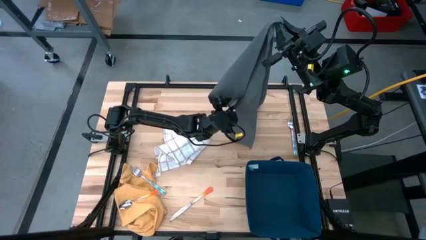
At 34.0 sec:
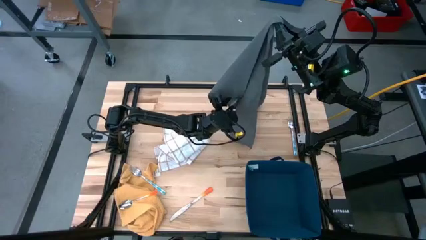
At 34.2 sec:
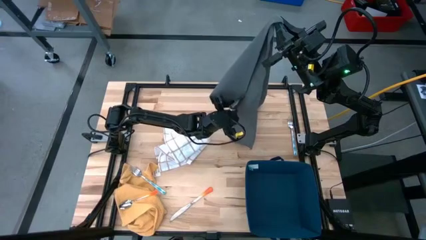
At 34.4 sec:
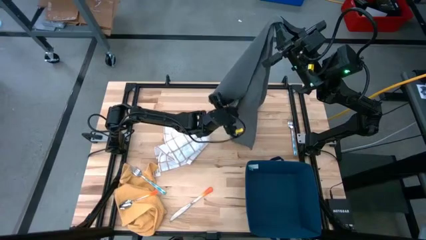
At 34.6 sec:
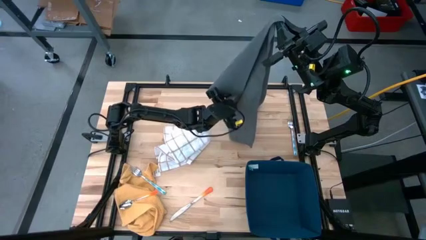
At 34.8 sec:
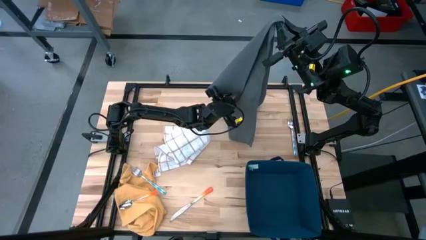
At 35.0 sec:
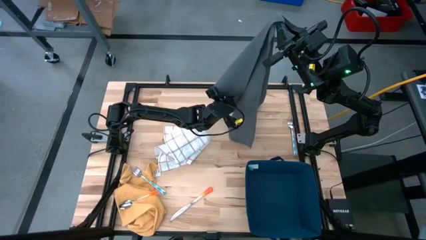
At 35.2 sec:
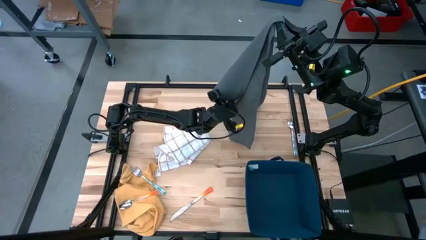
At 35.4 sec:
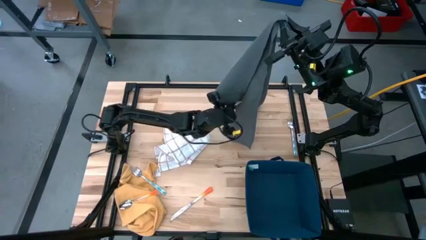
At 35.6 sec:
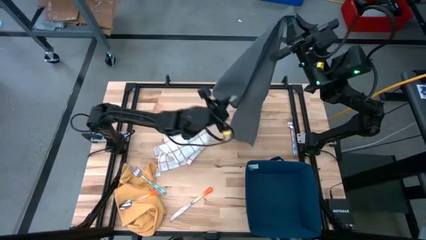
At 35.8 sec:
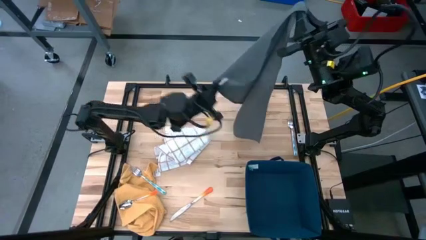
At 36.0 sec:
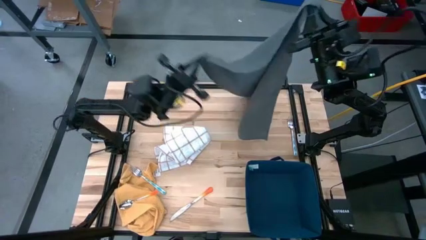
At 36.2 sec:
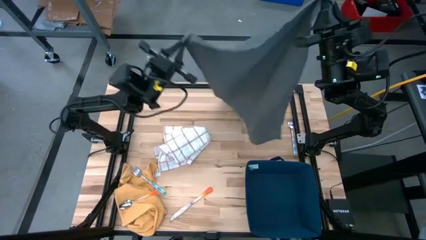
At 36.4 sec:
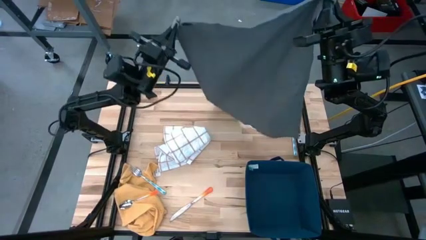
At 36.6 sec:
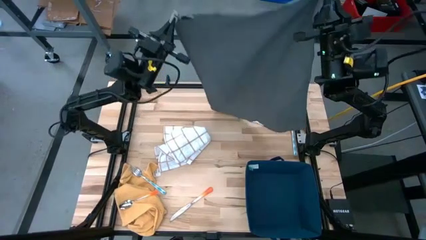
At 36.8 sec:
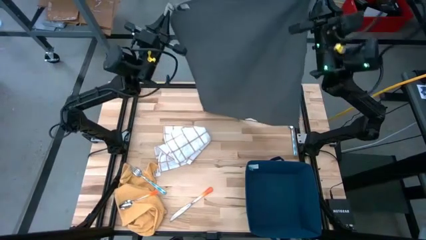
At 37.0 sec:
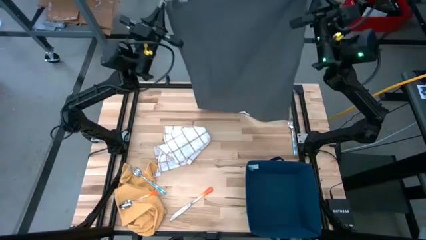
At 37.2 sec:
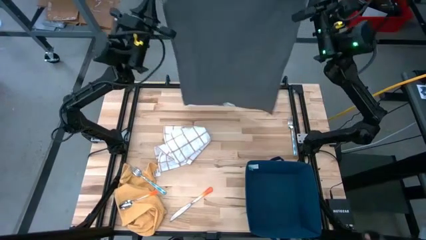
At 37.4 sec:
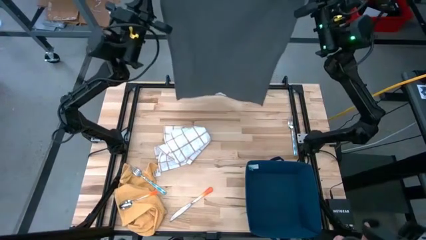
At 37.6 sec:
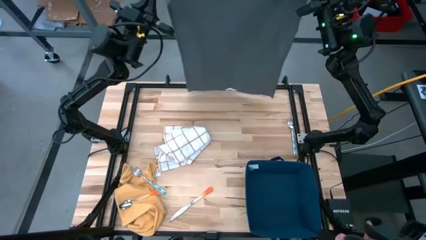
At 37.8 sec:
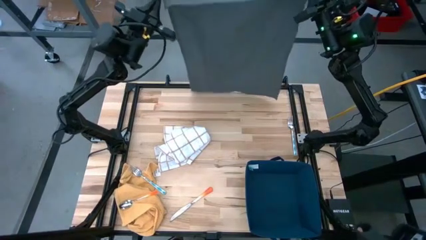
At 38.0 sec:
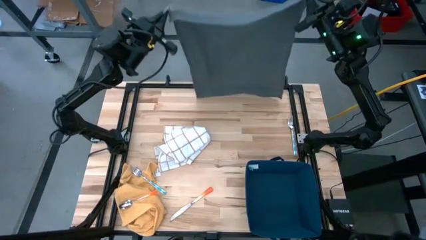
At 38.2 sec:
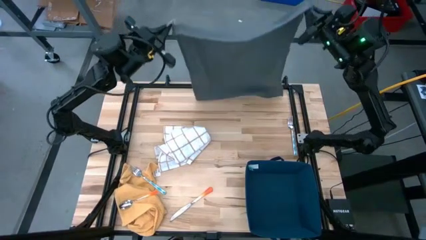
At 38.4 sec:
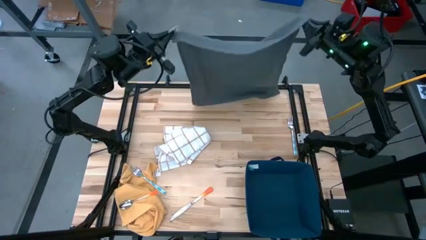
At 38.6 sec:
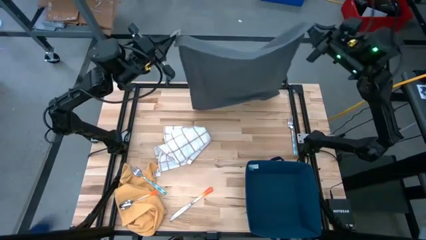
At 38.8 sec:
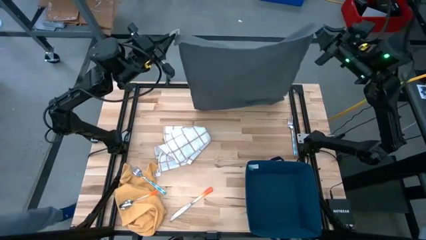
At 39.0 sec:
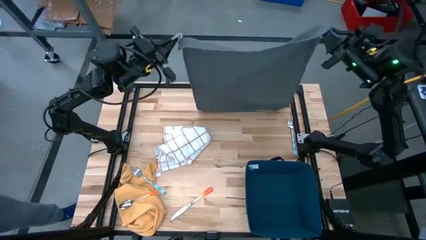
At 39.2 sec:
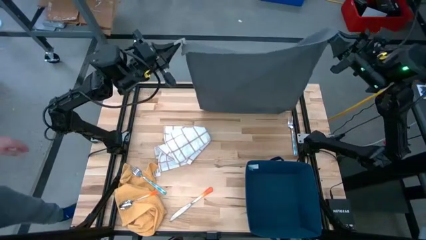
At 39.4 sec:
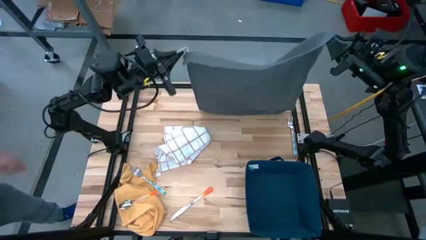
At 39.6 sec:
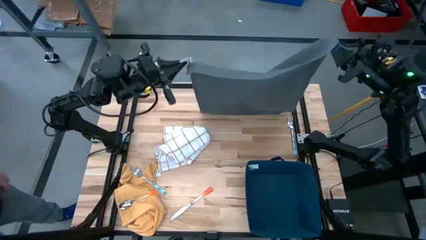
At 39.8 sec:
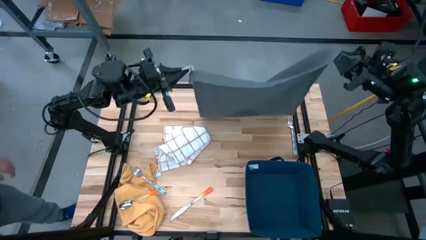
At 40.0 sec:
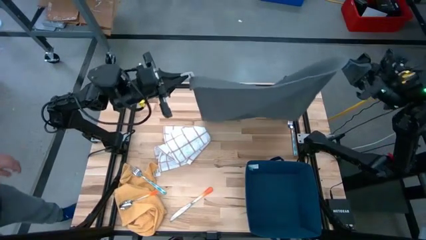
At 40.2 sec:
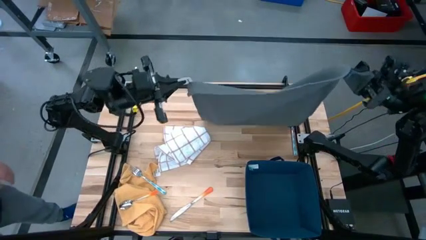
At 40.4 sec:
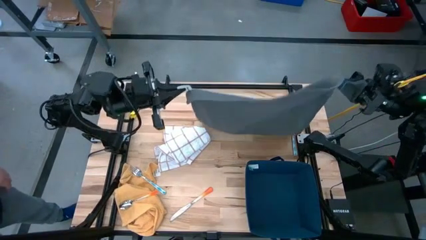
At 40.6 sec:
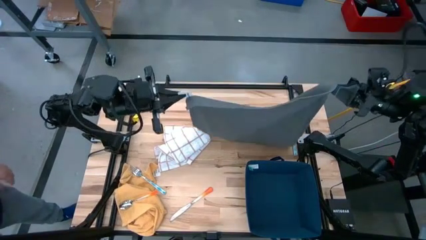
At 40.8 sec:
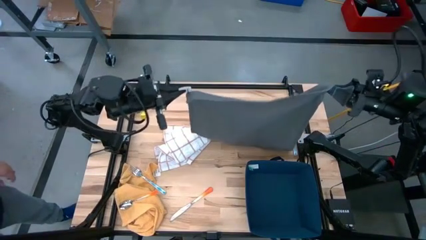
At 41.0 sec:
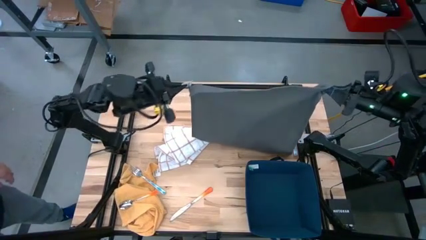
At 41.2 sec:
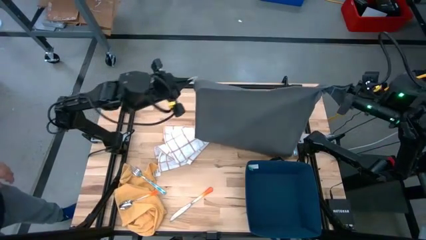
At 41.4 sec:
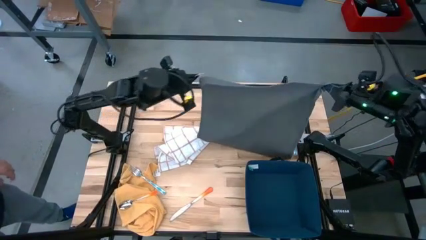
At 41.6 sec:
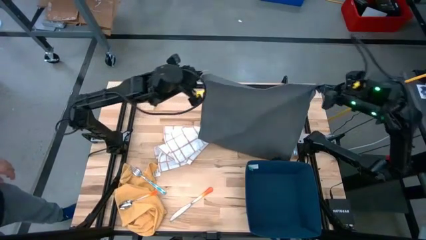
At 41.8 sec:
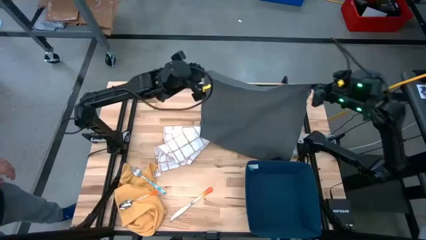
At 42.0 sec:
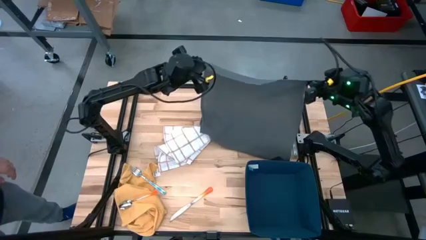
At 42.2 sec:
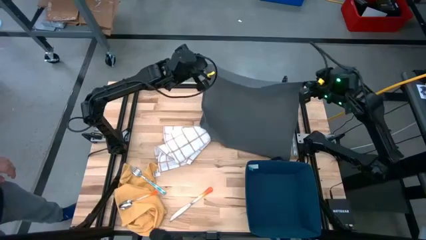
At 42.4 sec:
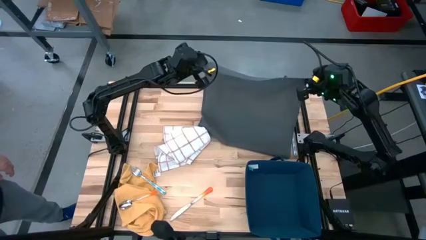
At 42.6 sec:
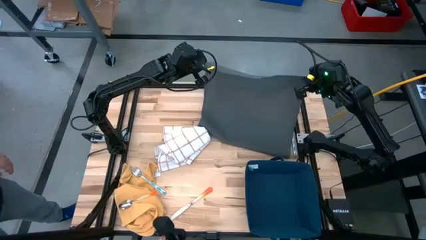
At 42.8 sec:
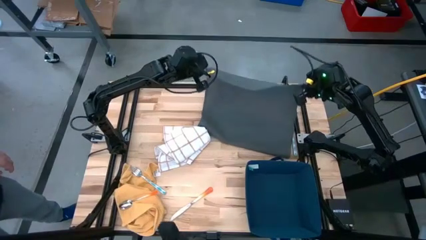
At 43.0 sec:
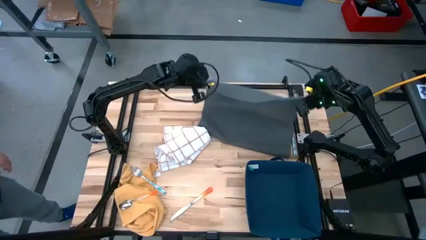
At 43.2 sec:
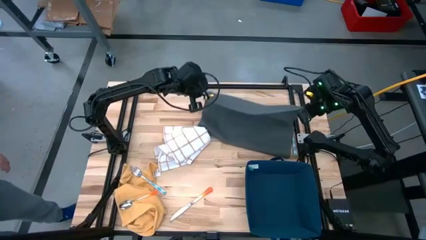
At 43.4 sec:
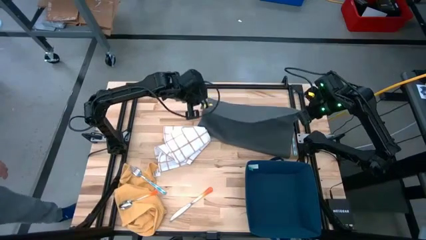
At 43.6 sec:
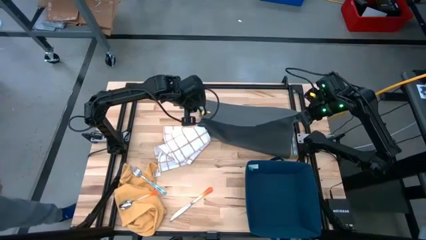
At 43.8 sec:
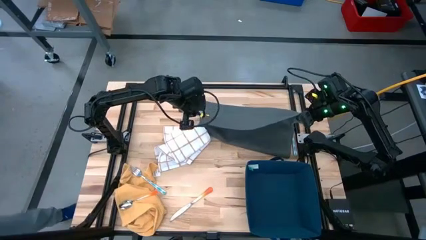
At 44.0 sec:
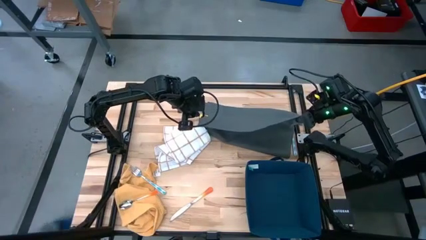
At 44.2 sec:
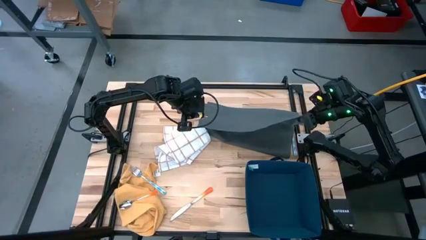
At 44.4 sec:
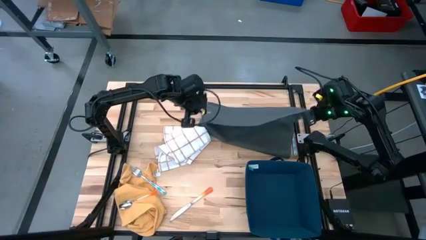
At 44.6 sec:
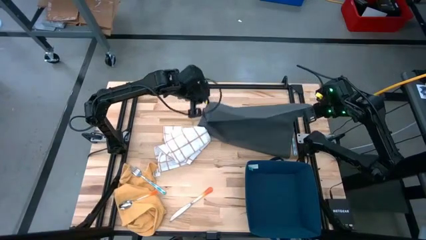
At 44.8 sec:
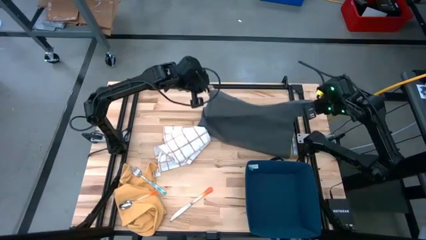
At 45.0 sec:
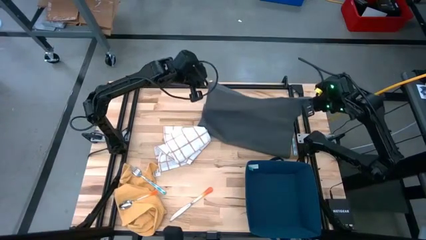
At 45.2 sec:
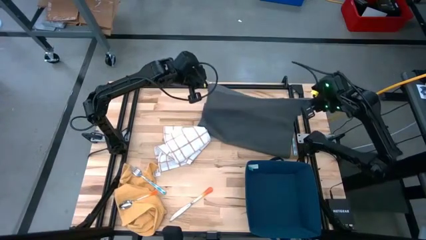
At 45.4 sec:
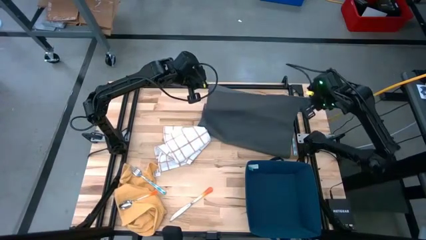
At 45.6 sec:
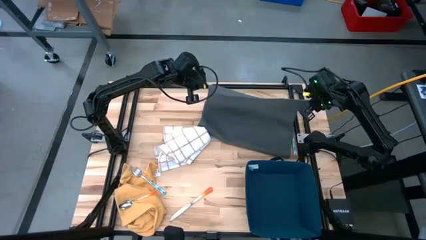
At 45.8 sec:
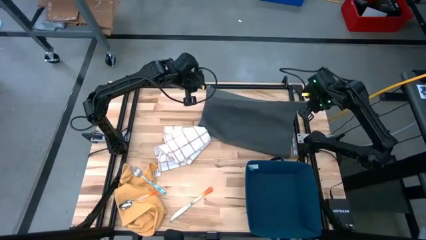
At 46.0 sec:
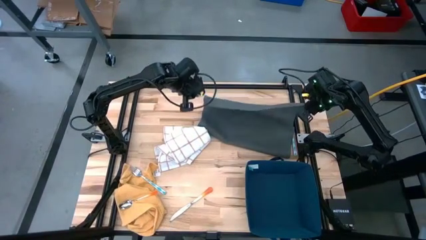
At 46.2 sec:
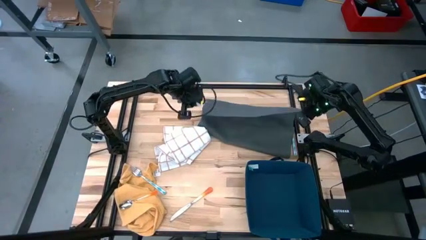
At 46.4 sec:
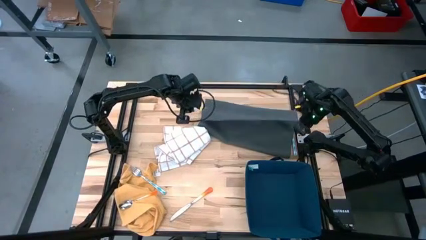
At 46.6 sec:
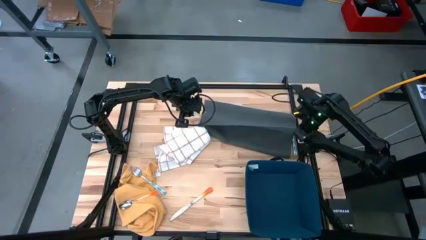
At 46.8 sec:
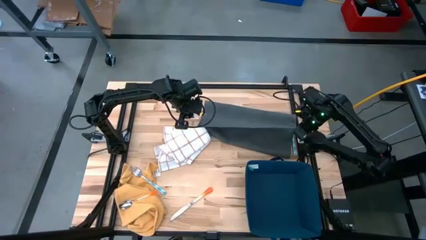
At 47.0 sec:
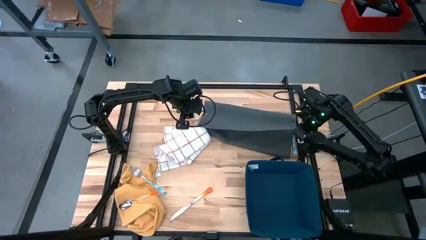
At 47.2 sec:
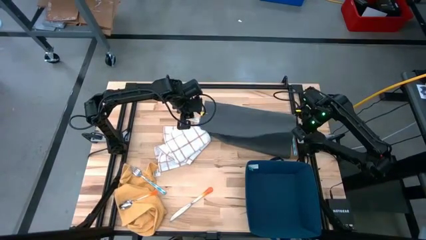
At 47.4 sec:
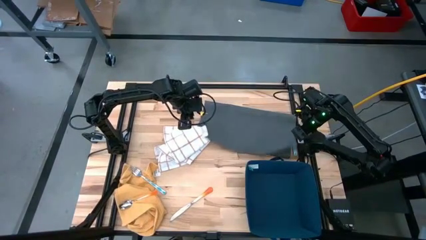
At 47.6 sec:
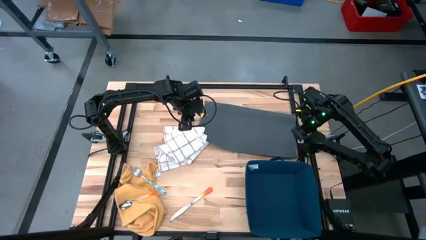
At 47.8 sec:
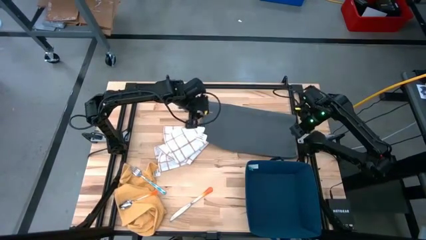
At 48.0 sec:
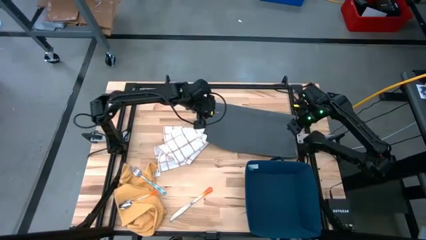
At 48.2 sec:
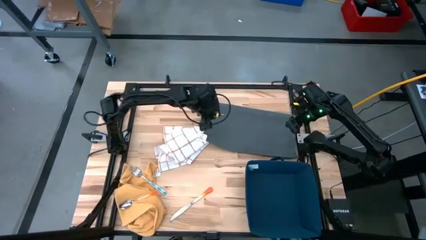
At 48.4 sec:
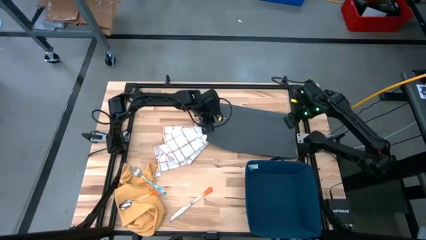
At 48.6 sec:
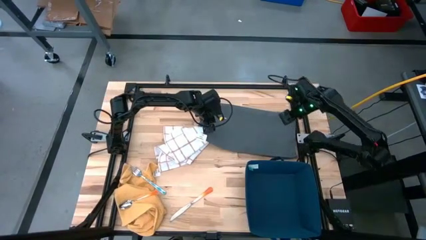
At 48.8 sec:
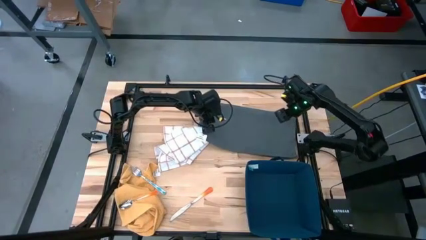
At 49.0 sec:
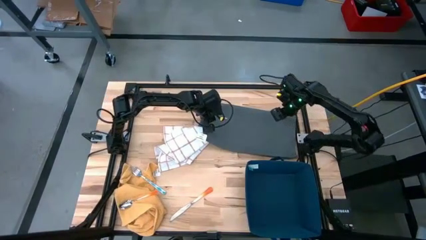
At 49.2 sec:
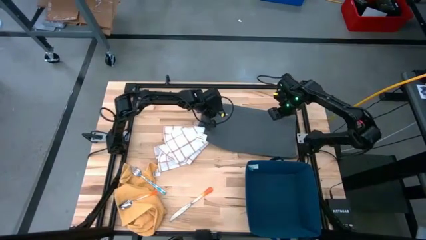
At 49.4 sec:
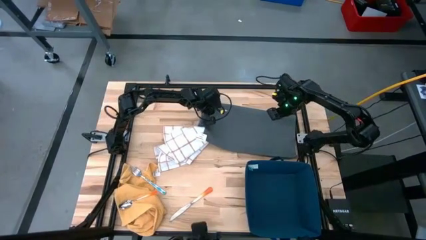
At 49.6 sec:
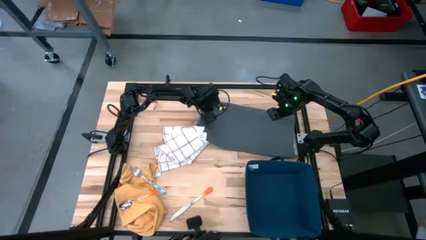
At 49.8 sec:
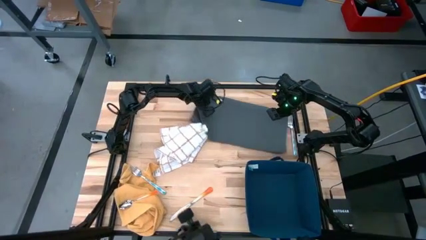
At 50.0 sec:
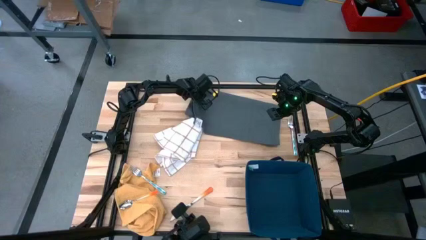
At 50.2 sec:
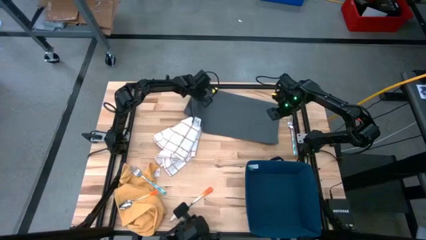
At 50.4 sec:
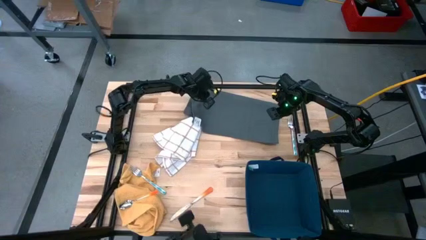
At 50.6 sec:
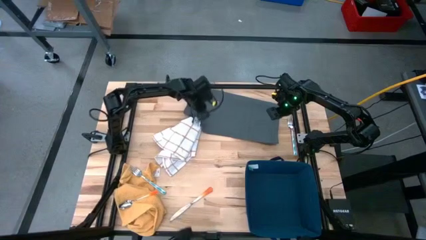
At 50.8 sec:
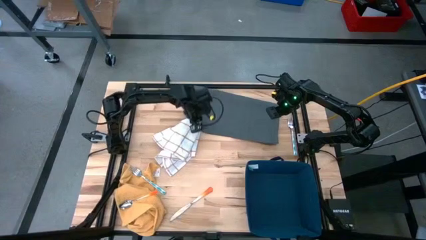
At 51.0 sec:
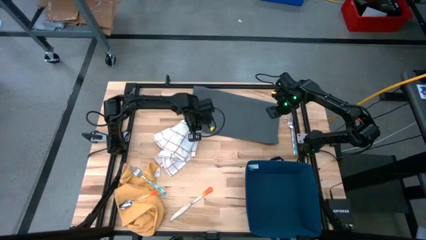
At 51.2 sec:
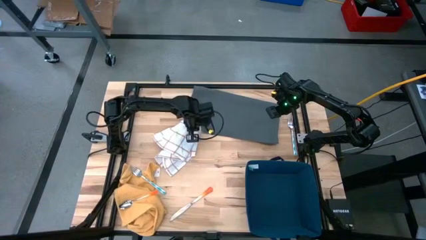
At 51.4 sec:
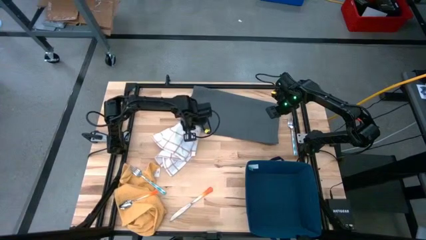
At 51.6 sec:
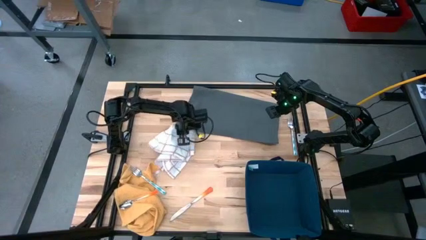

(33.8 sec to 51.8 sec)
Task: Fold towel
Fold the grey towel
